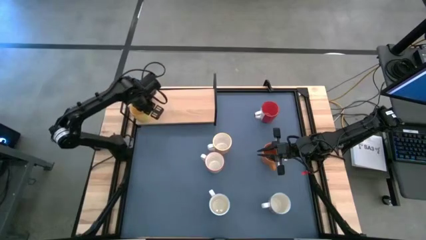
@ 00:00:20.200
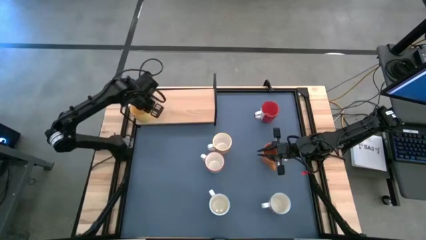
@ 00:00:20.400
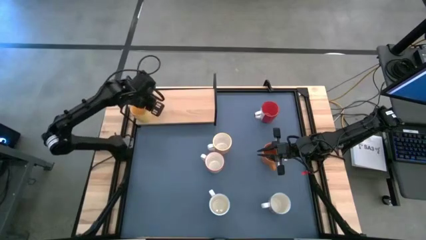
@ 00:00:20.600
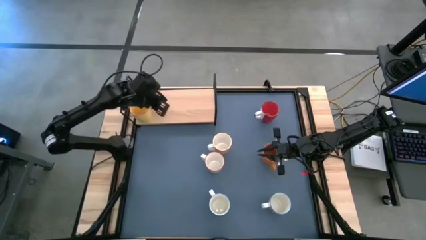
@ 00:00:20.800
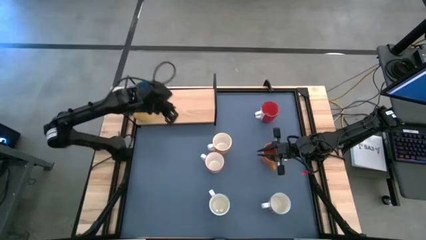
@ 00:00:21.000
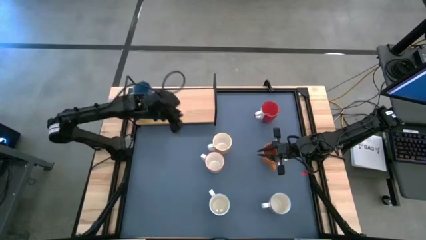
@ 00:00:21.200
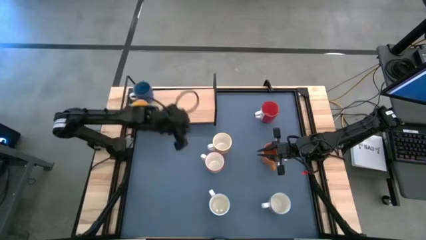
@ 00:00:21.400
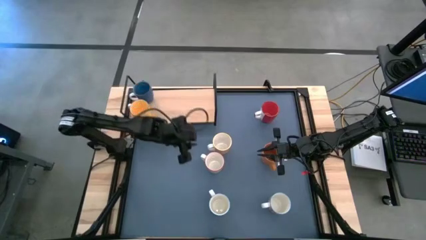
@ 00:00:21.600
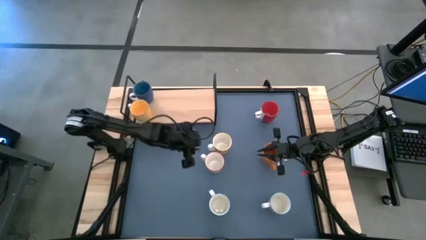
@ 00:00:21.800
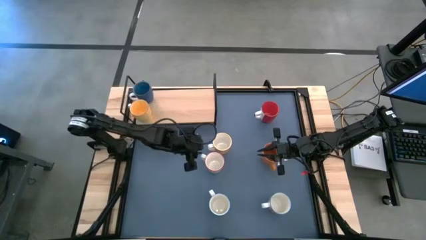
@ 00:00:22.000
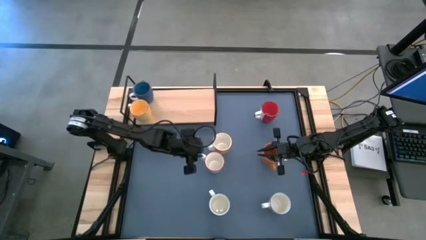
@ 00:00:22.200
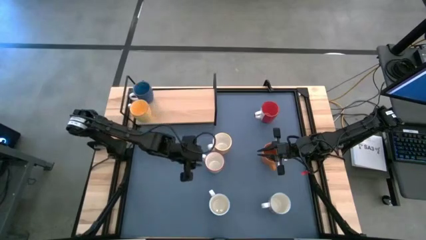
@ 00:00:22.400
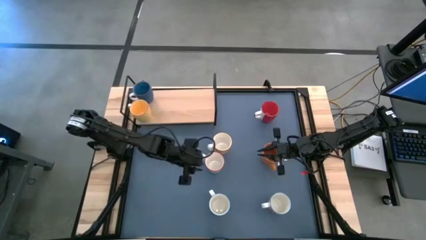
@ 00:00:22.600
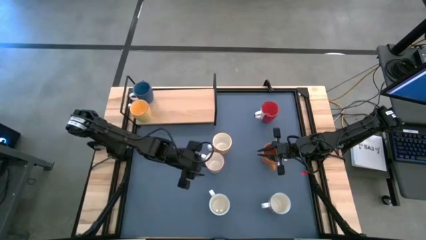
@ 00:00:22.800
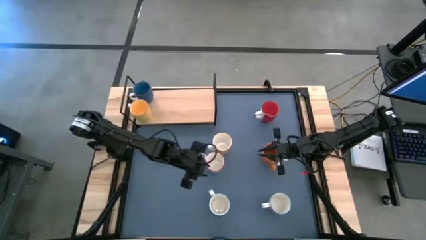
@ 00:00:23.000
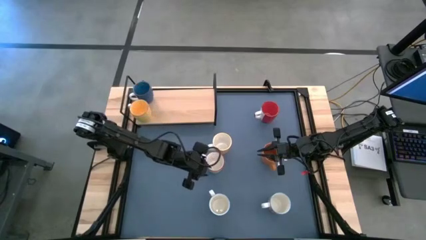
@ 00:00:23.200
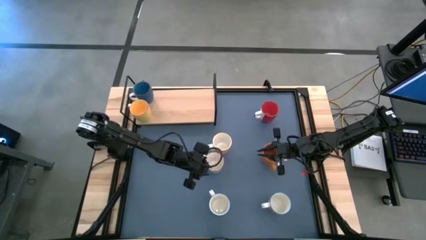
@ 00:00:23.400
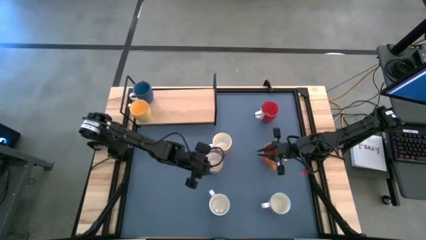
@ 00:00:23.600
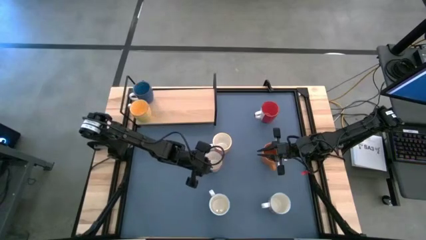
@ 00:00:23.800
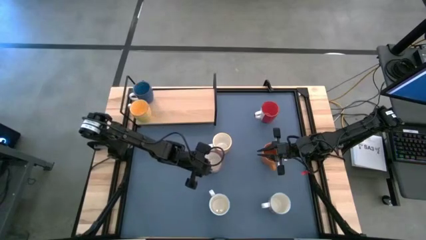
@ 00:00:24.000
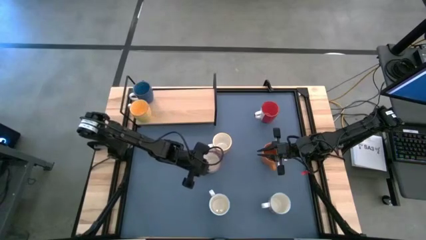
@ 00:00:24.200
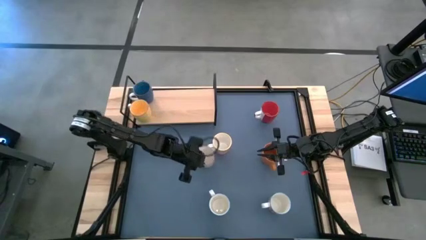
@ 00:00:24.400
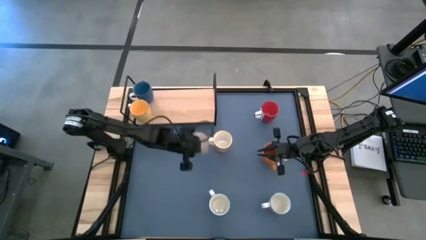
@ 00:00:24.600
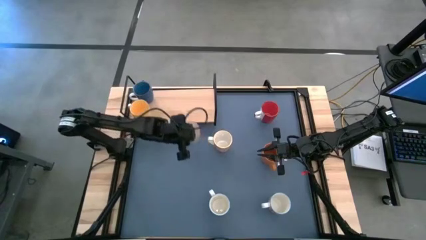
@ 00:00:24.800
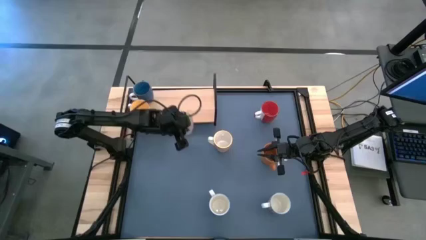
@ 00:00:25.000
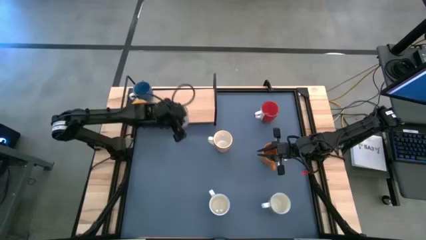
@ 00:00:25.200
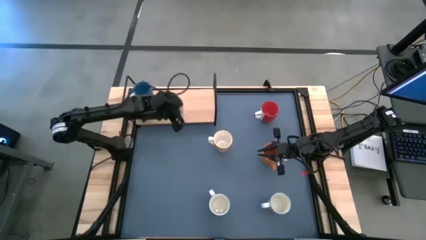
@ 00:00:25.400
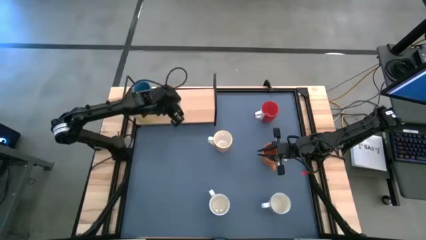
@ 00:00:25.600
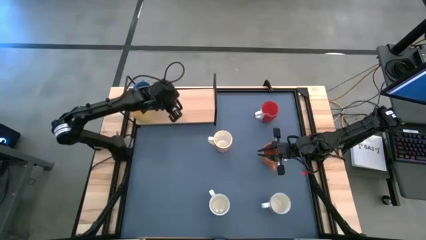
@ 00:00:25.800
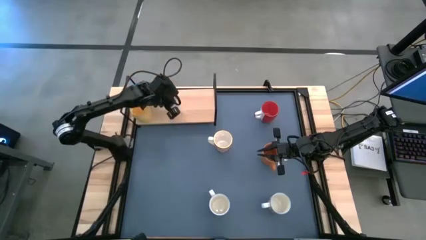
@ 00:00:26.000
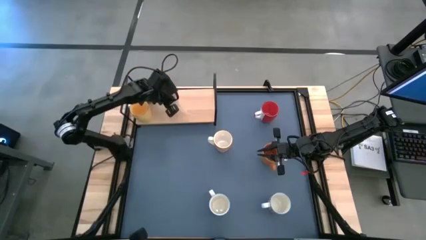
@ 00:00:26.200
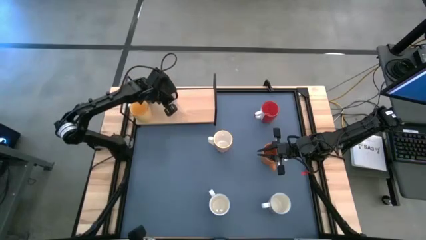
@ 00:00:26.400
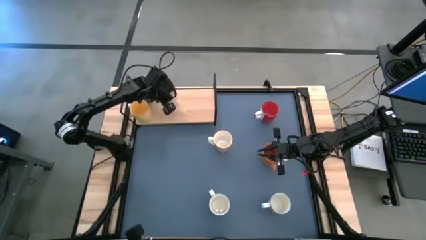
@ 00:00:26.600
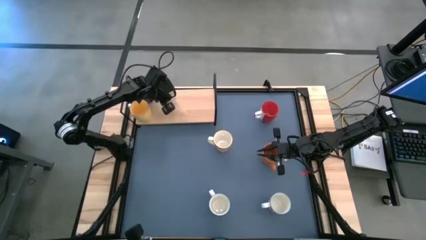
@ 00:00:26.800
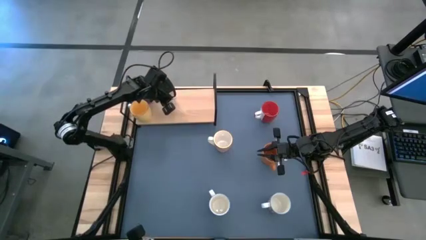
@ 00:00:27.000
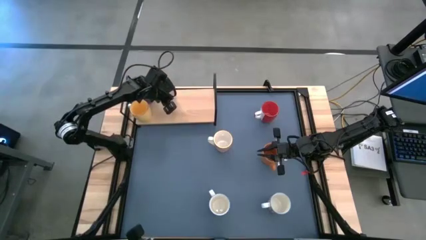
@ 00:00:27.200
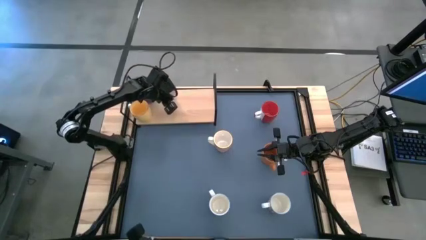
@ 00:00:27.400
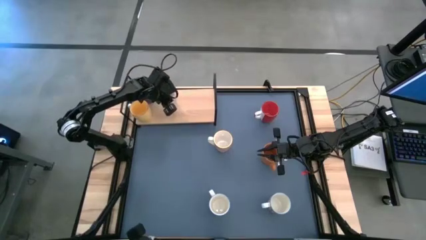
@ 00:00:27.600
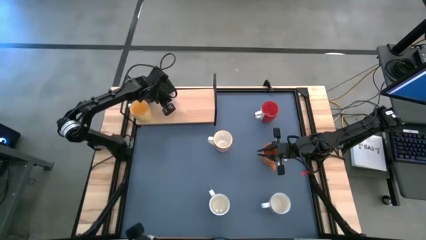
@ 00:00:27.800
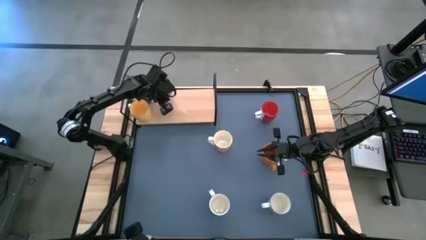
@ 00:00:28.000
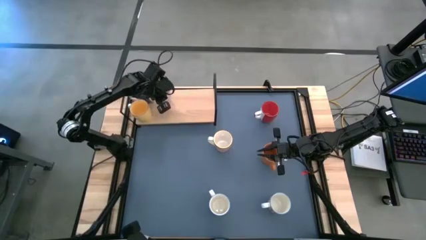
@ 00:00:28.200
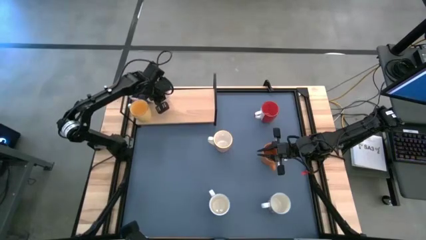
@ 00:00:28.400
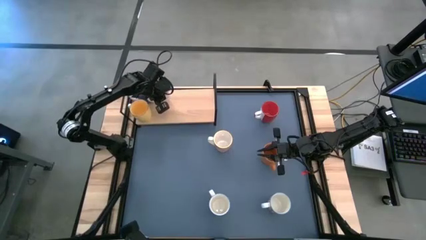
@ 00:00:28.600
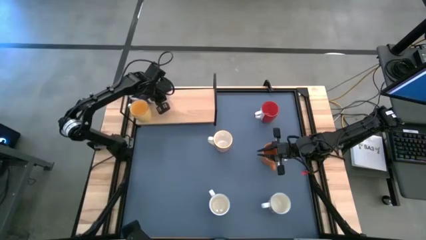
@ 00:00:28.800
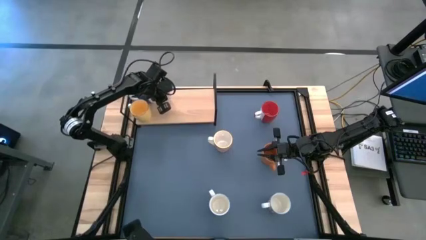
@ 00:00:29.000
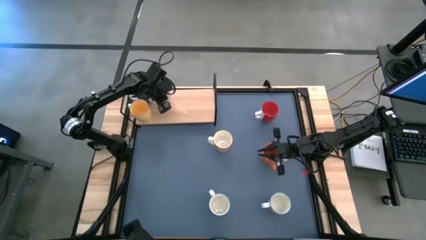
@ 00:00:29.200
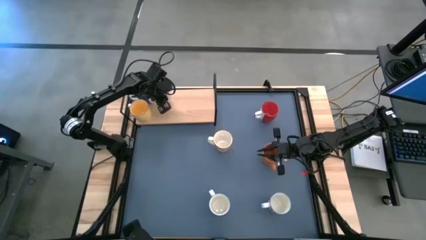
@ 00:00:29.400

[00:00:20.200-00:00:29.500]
Task: Place coffee mugs
Put the gray patterned mug on the shelf

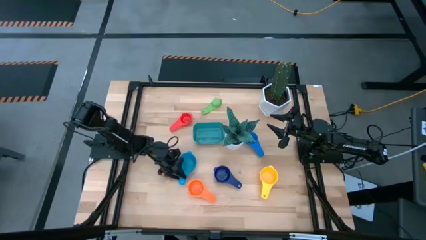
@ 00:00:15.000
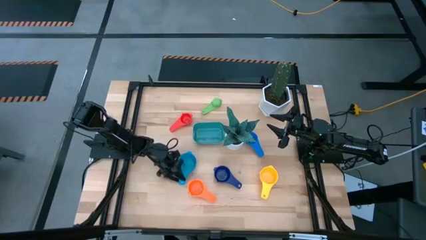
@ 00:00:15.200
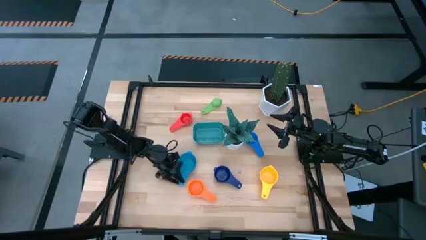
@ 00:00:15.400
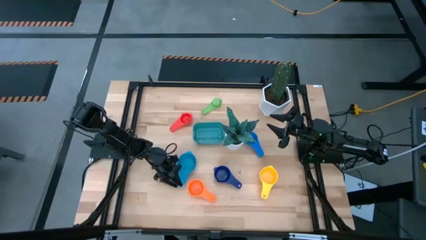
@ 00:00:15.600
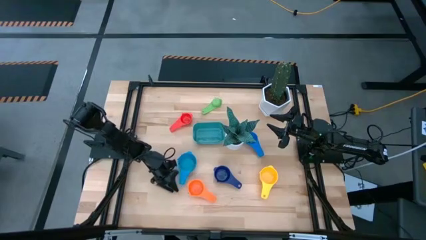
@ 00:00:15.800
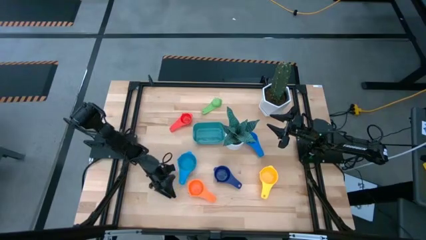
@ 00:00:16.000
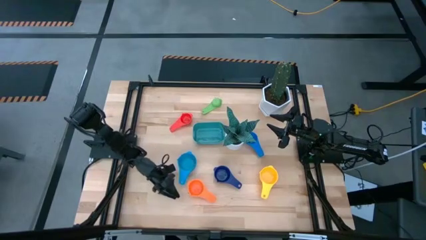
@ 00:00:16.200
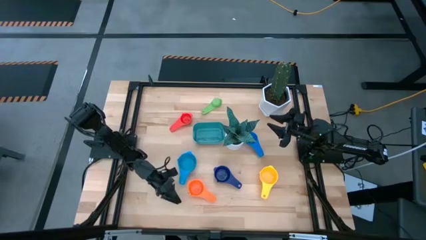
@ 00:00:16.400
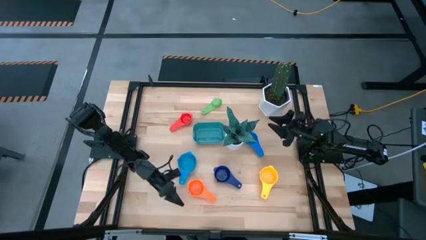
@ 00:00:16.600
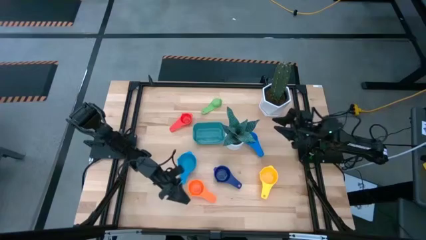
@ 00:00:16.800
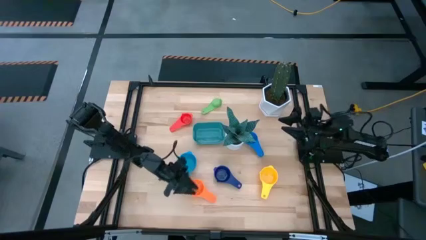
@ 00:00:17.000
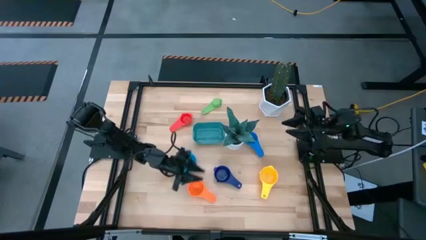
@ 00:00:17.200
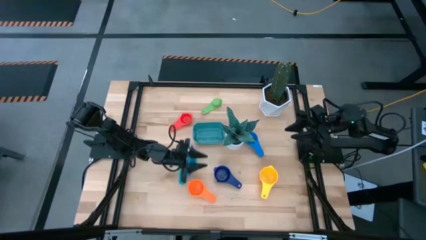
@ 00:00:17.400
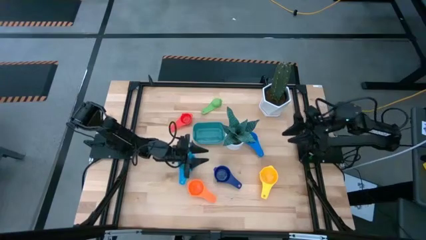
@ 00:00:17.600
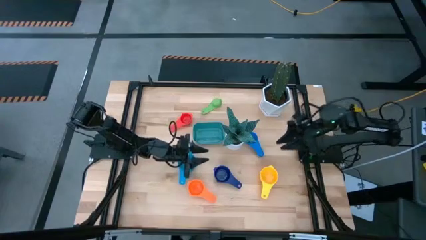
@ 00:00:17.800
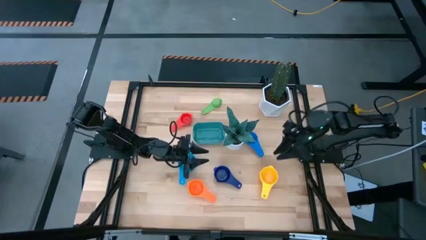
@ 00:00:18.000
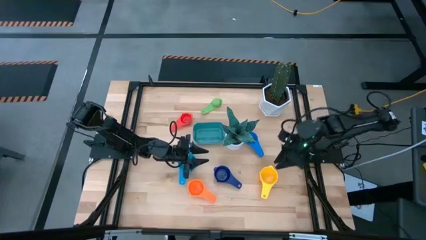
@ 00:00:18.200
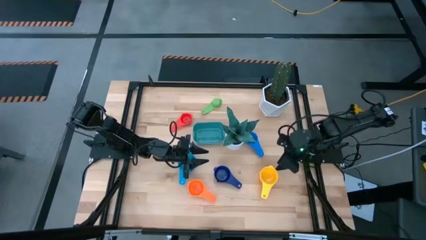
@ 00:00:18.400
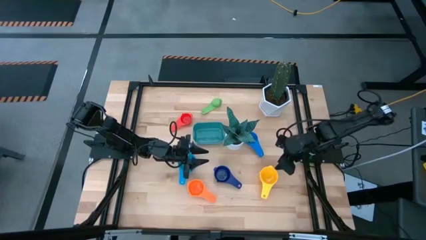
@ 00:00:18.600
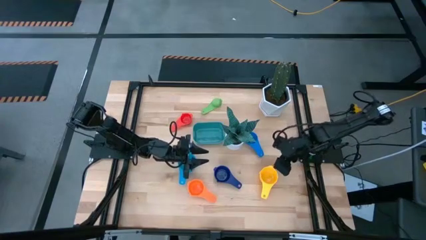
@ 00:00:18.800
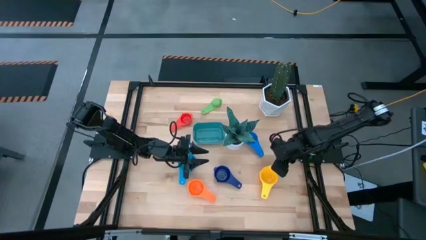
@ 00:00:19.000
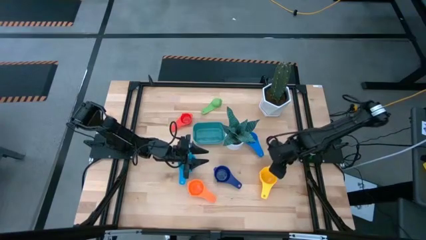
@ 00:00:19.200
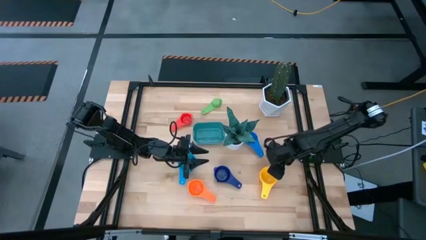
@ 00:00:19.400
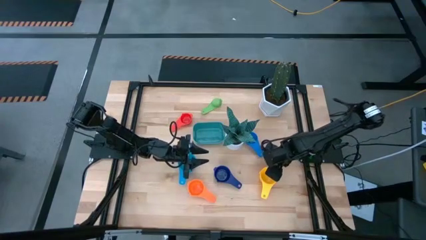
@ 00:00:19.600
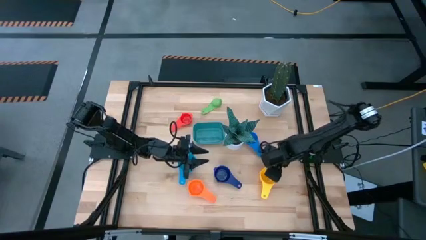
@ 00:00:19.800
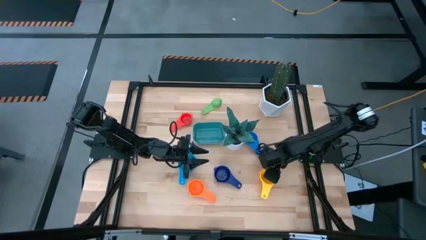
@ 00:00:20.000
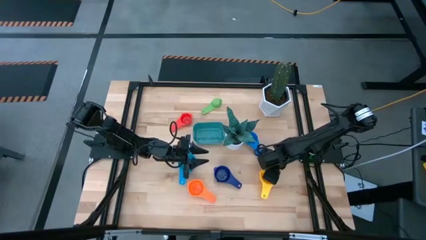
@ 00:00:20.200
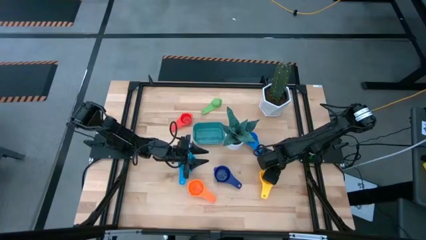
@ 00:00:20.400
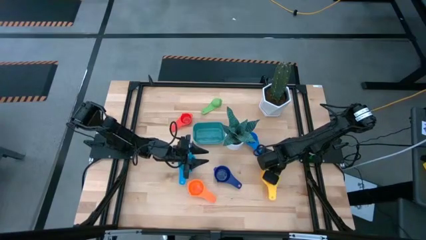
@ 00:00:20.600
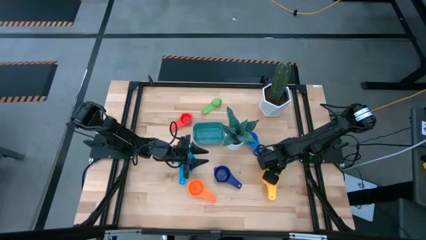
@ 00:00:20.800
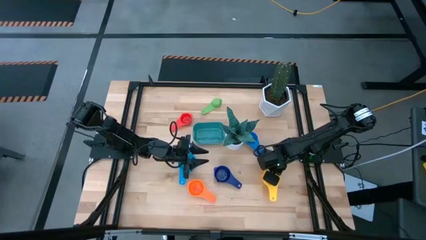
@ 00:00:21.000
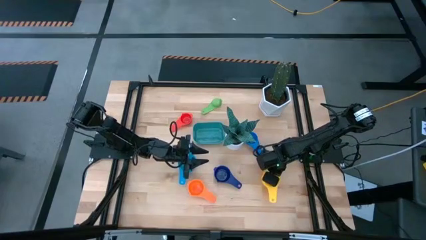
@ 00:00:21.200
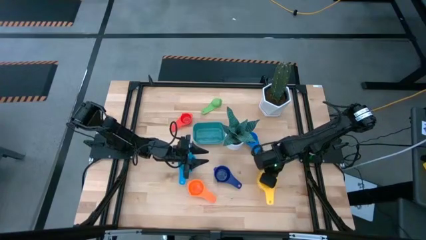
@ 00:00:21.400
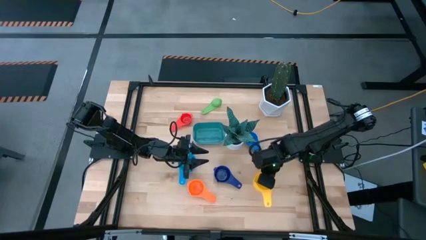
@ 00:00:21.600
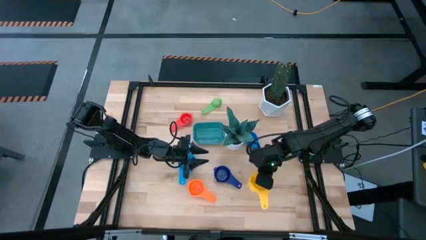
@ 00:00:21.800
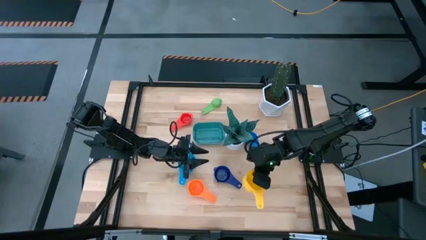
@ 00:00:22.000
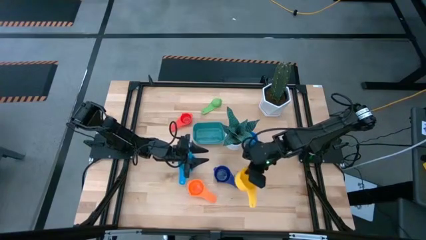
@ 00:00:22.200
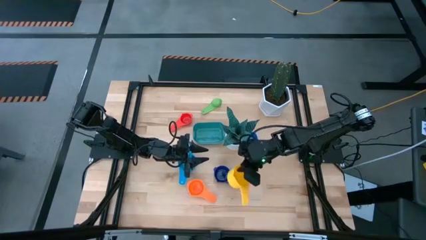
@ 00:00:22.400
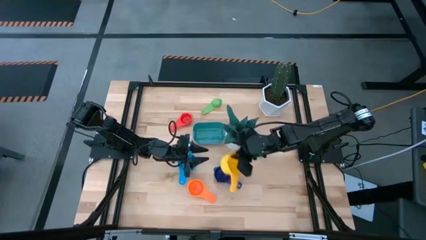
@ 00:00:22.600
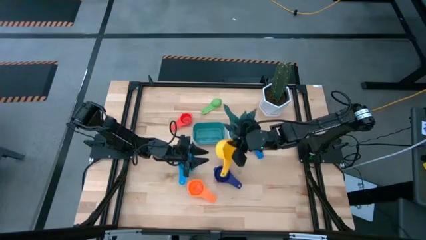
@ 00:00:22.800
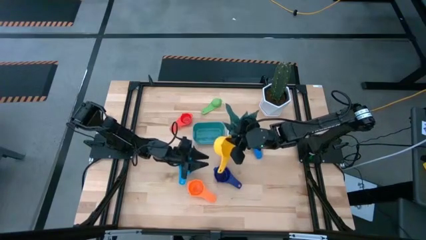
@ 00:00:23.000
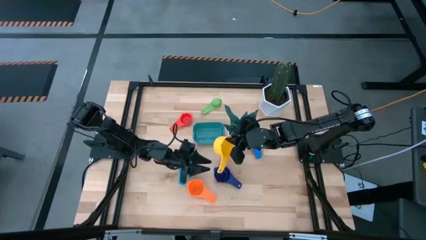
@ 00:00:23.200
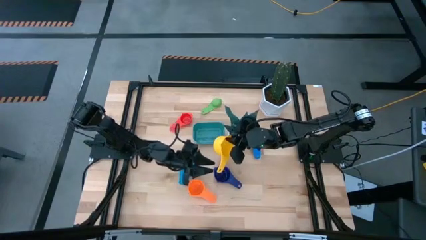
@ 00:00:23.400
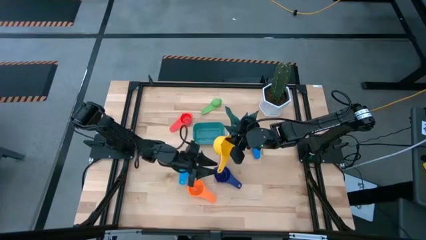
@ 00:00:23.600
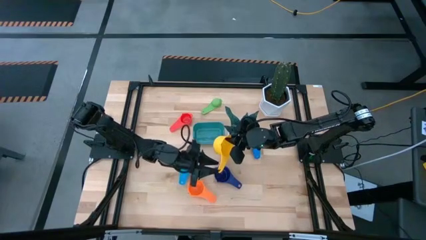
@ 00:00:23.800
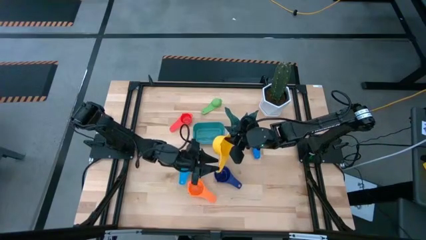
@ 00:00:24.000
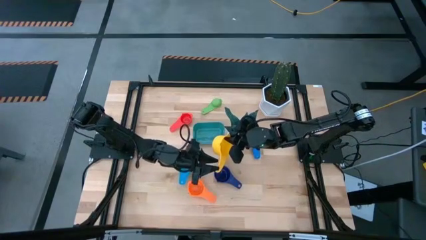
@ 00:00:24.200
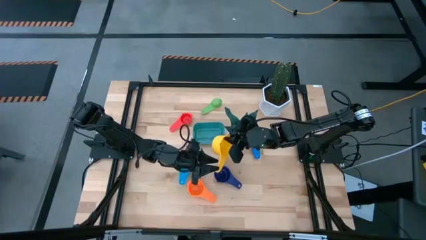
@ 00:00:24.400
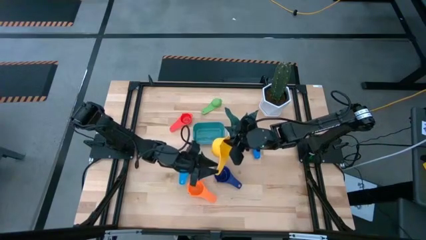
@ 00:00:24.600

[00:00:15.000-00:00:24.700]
Task: Nest measuring cups in basket
Stack the yellow measuring cup on top of the light blue measuring cup
